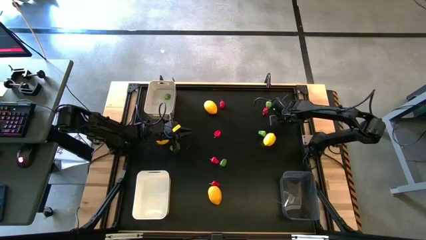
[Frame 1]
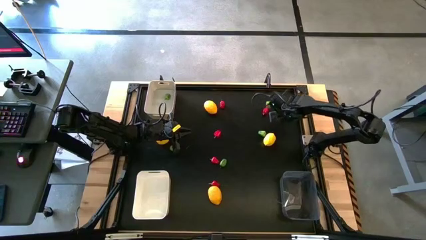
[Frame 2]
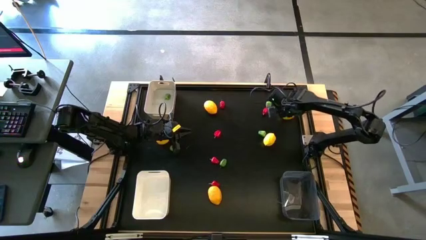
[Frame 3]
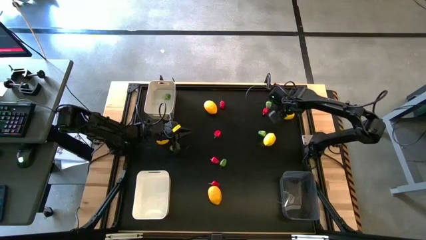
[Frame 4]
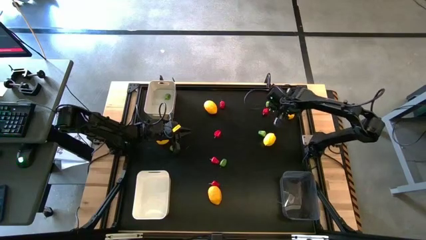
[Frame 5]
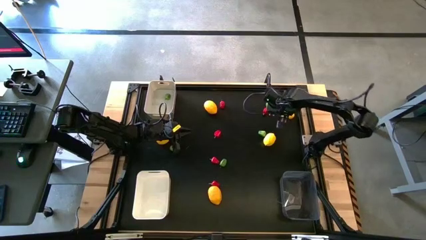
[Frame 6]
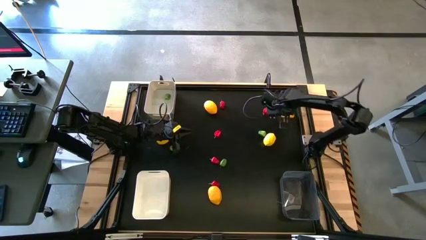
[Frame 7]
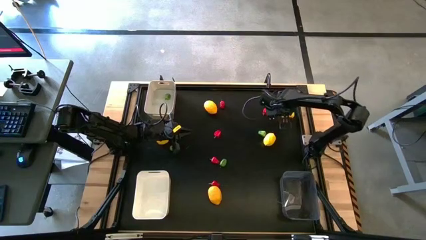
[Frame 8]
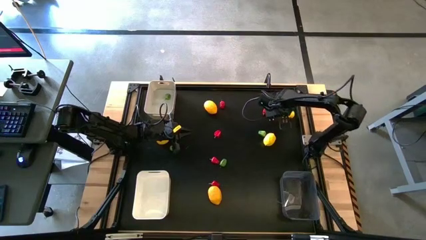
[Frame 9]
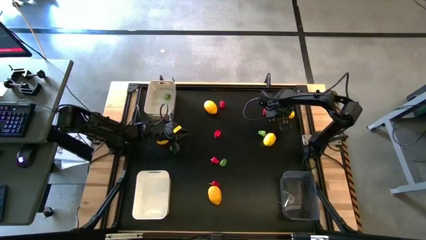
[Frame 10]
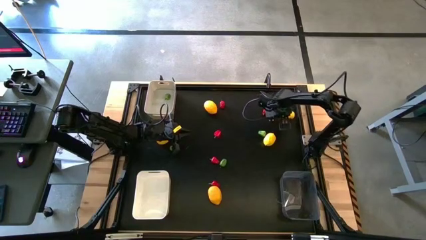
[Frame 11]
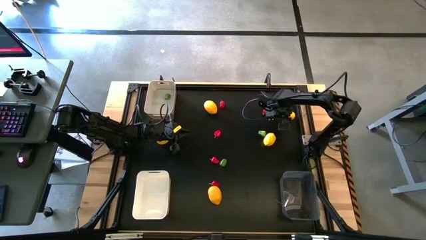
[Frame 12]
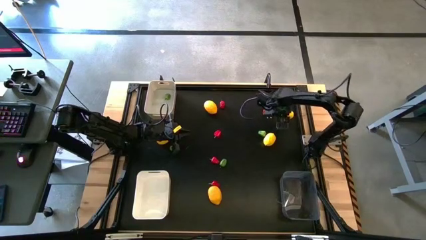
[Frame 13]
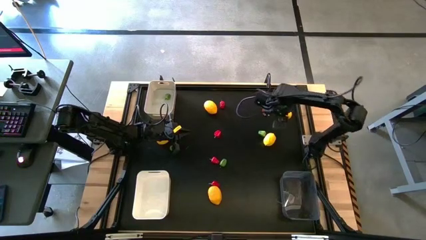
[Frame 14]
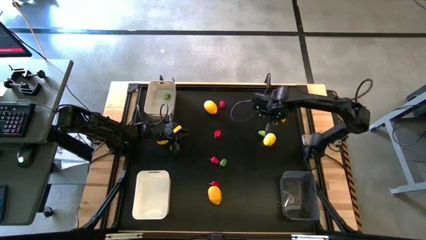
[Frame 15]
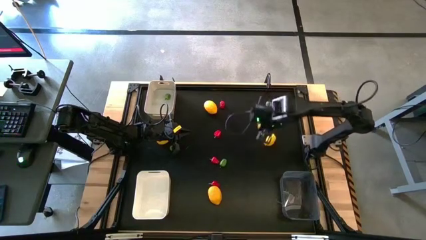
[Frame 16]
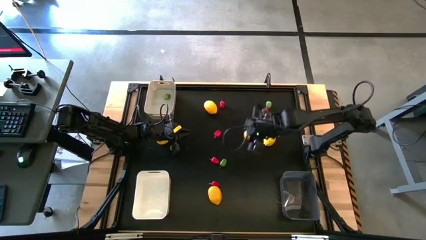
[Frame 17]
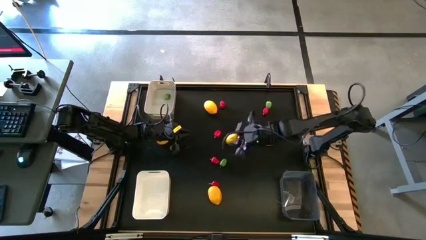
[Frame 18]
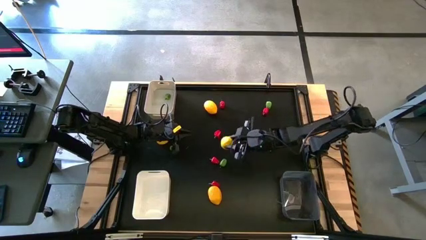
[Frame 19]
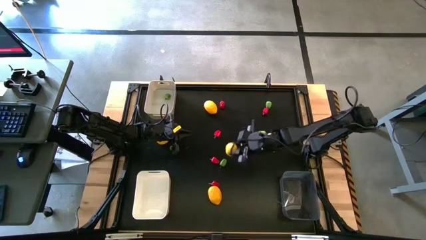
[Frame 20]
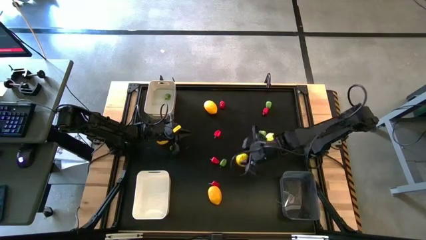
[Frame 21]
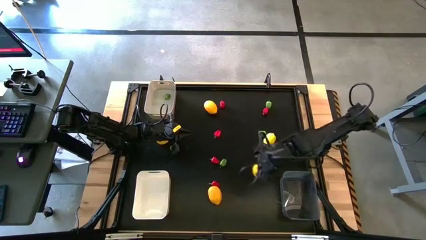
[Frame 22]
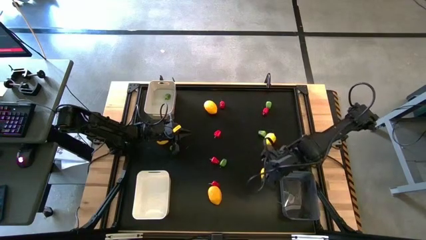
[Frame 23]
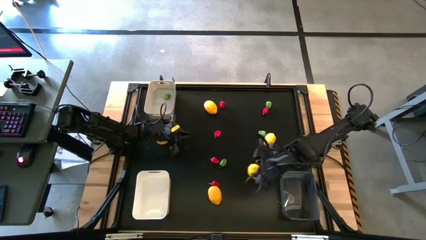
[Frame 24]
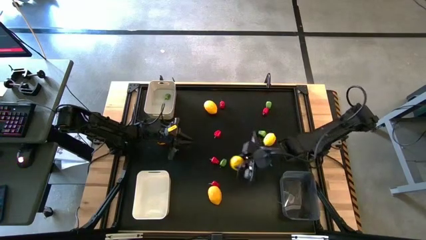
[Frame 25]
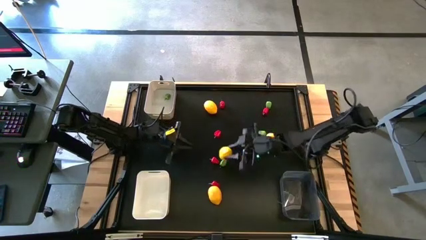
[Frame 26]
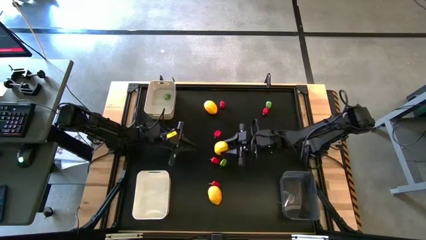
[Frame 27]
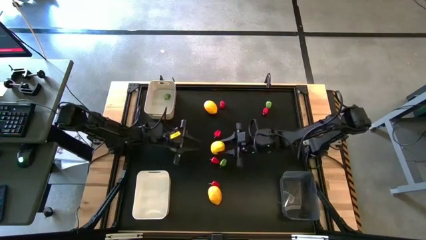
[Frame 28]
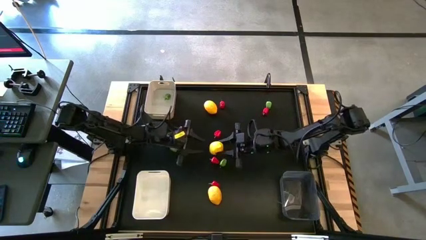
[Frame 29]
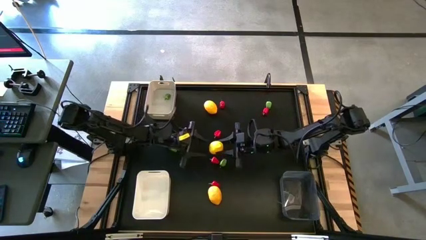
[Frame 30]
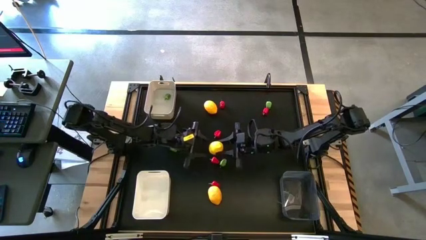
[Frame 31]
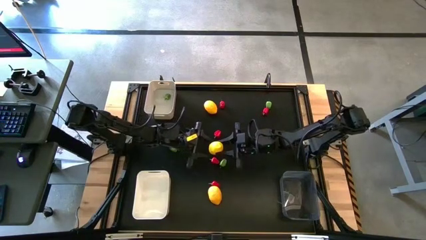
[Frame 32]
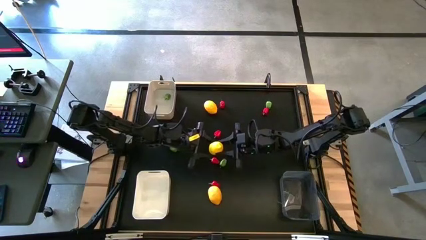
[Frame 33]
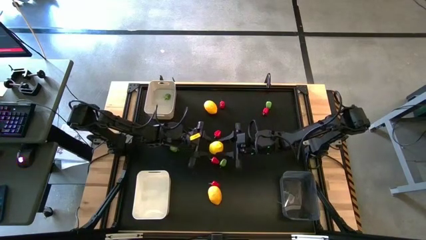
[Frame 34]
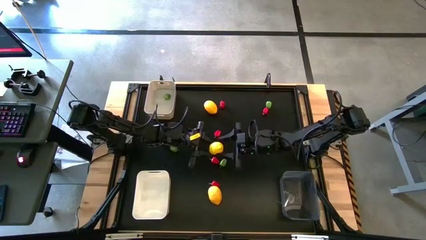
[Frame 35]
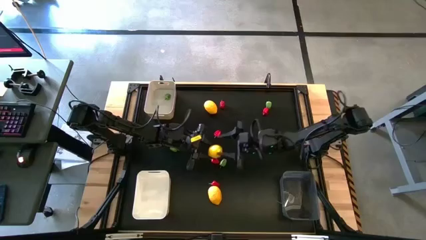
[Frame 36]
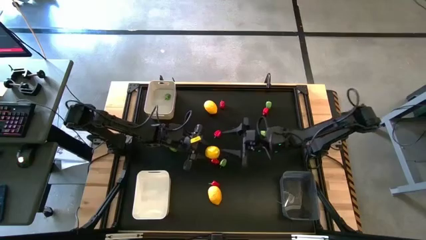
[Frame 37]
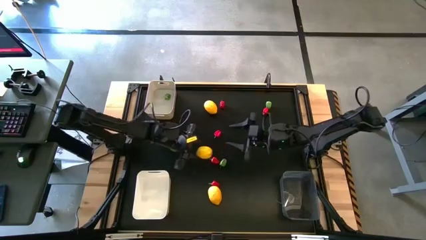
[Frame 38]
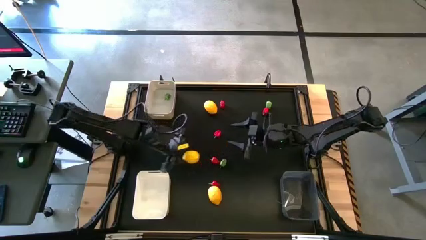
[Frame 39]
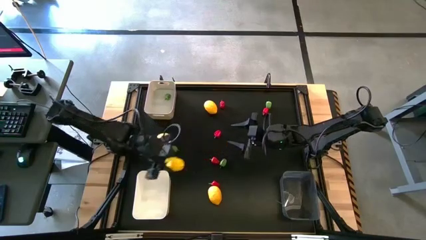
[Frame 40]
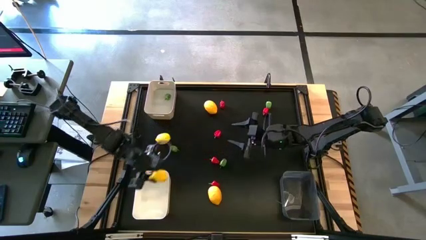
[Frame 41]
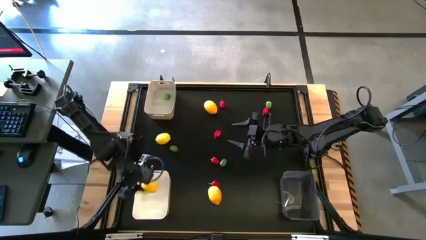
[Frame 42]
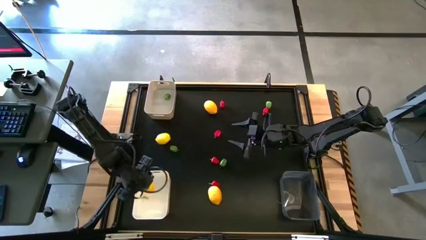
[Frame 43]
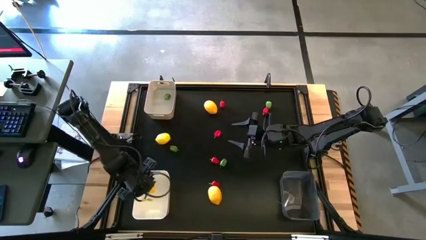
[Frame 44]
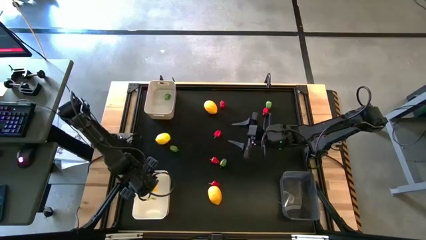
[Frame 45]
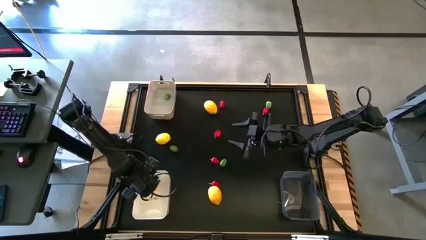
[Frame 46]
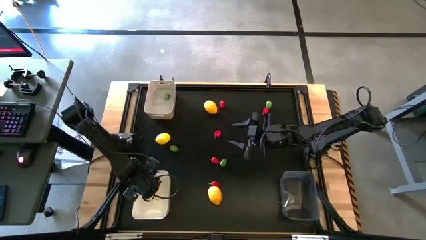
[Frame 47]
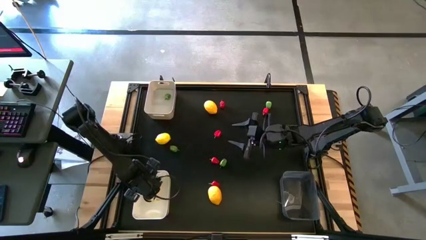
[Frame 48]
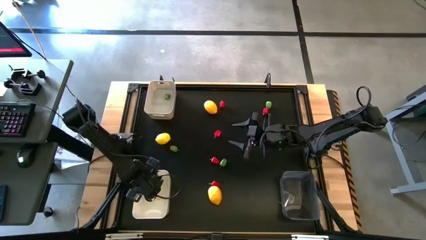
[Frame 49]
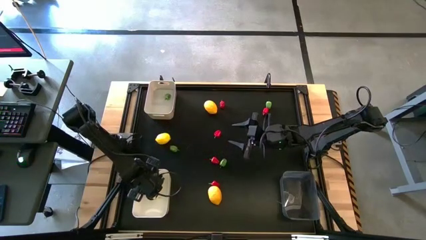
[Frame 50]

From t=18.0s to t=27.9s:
Task: Sort produce into baskets
Put the yellow lemon into the white bin
